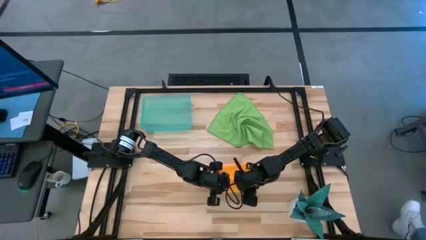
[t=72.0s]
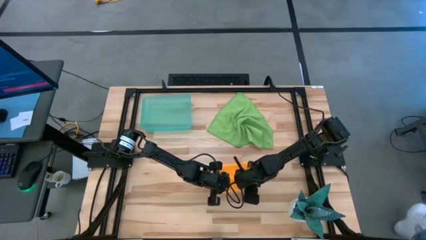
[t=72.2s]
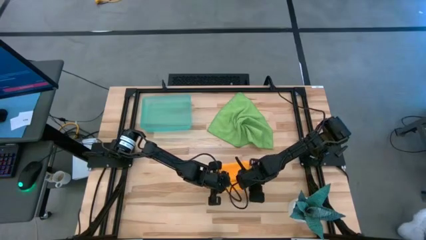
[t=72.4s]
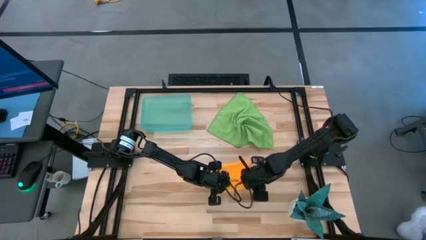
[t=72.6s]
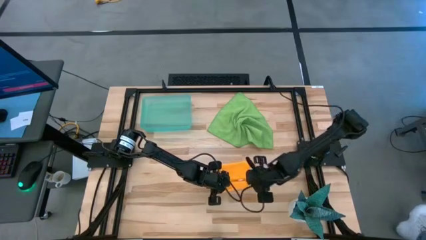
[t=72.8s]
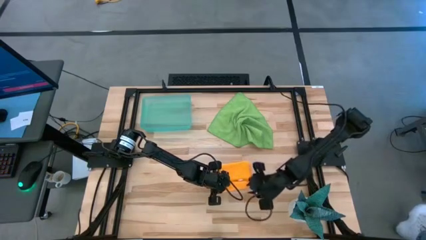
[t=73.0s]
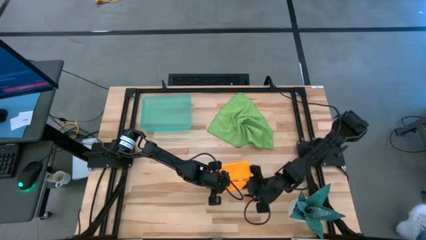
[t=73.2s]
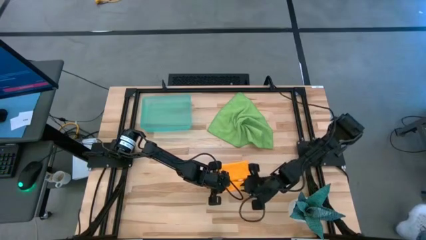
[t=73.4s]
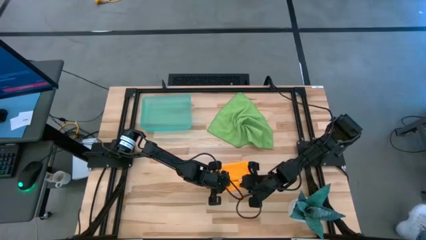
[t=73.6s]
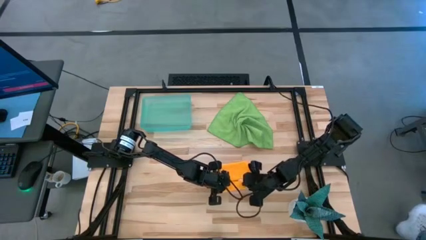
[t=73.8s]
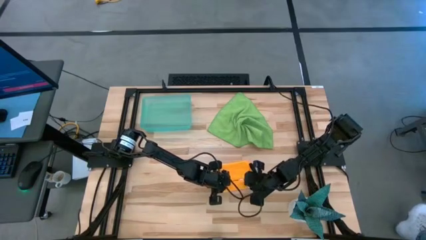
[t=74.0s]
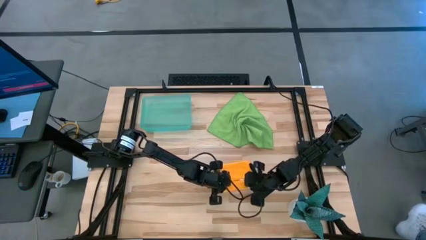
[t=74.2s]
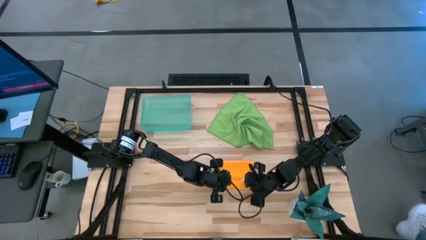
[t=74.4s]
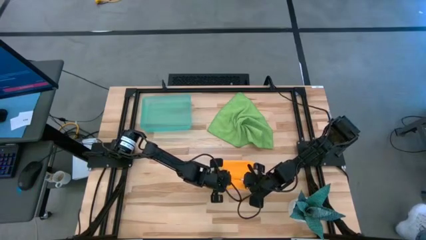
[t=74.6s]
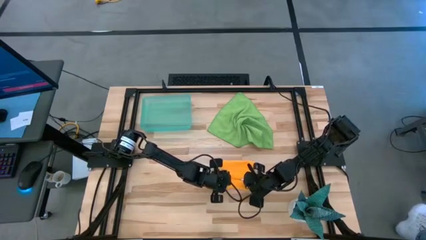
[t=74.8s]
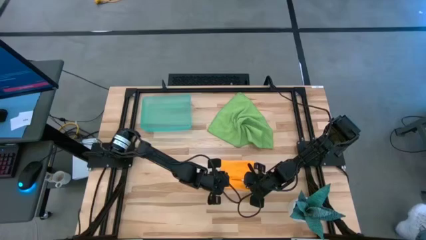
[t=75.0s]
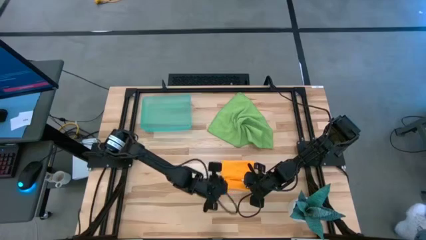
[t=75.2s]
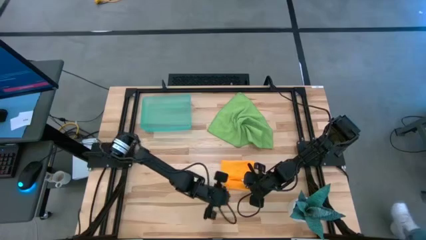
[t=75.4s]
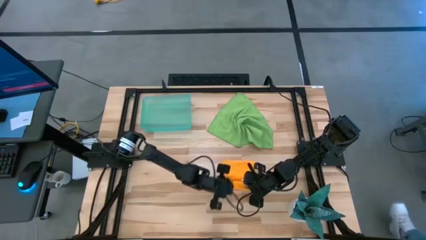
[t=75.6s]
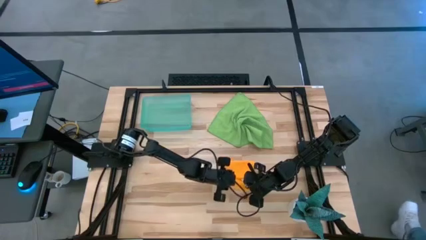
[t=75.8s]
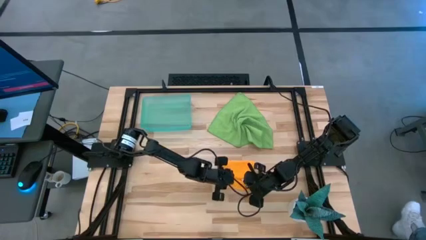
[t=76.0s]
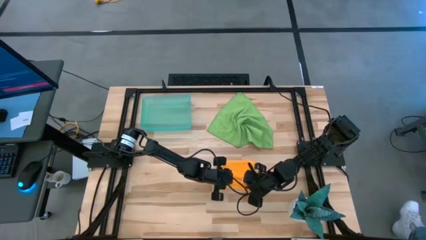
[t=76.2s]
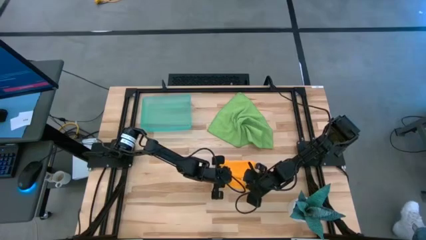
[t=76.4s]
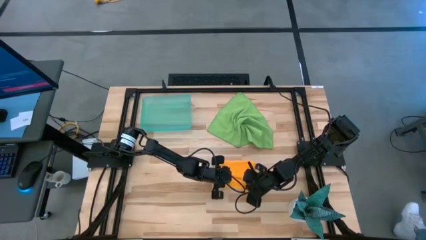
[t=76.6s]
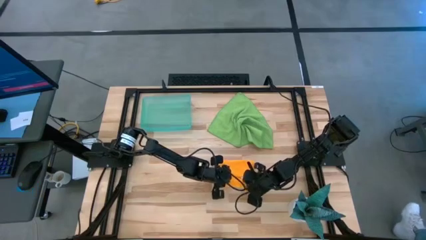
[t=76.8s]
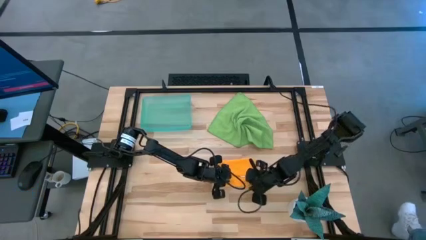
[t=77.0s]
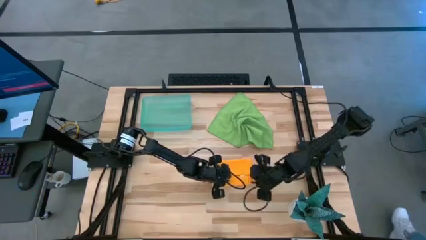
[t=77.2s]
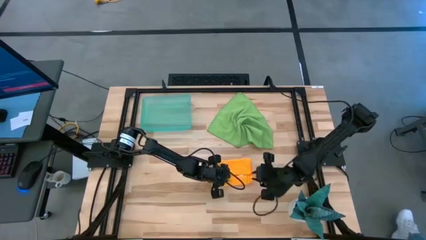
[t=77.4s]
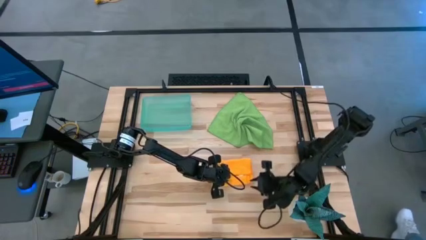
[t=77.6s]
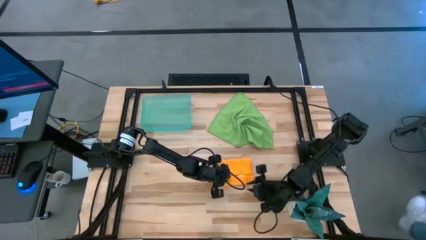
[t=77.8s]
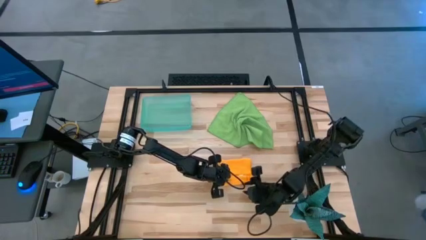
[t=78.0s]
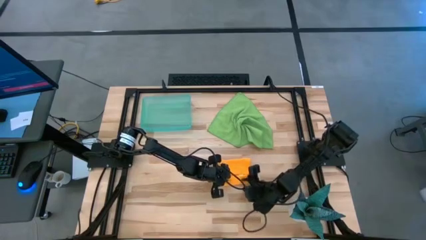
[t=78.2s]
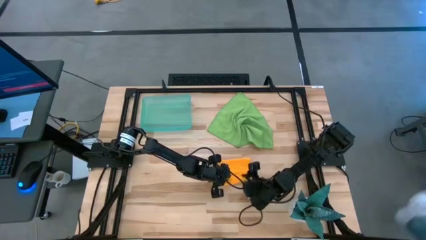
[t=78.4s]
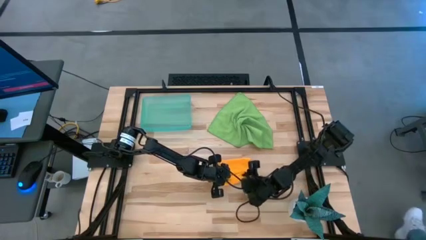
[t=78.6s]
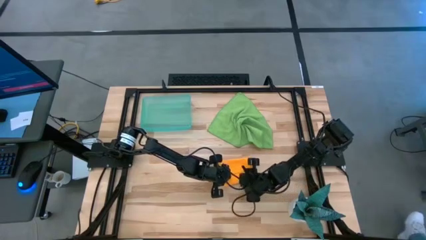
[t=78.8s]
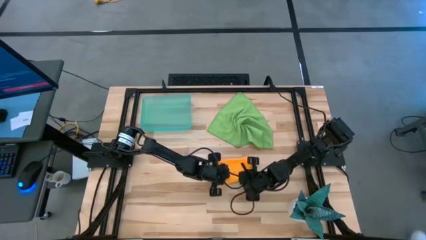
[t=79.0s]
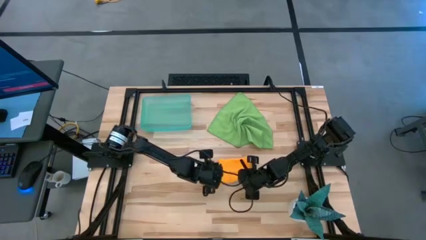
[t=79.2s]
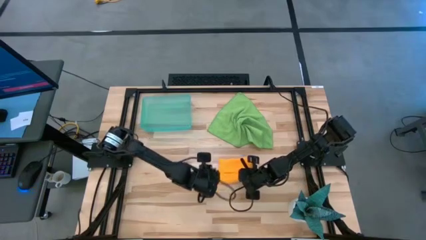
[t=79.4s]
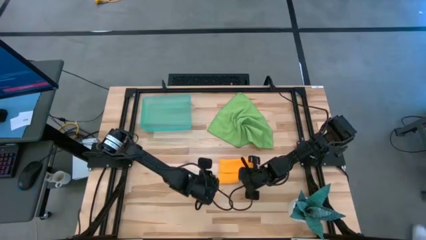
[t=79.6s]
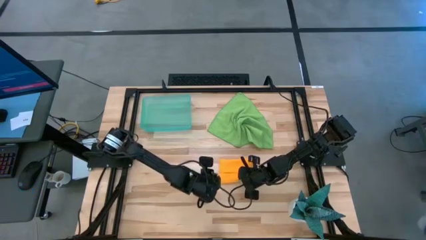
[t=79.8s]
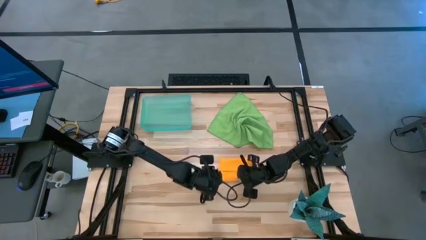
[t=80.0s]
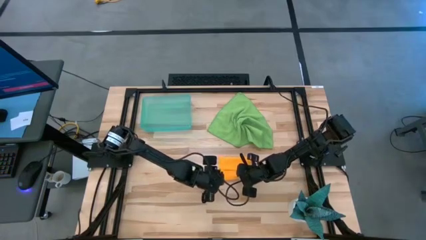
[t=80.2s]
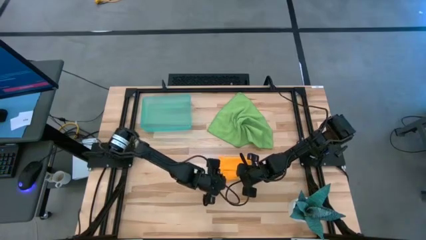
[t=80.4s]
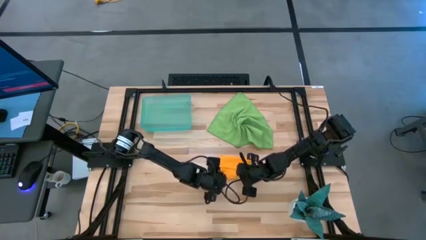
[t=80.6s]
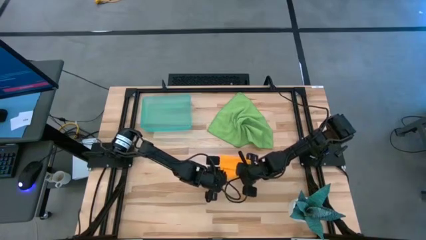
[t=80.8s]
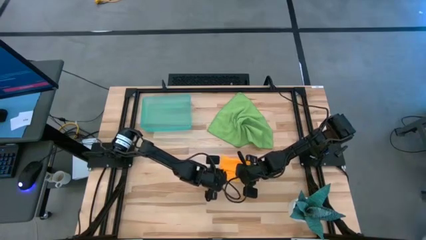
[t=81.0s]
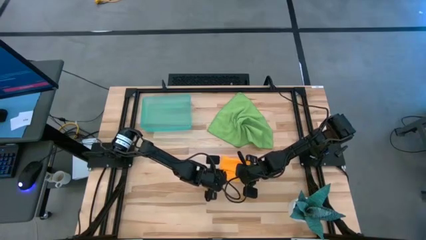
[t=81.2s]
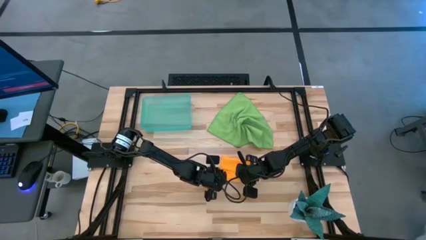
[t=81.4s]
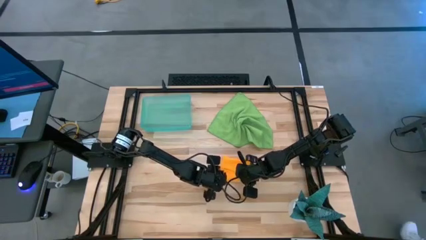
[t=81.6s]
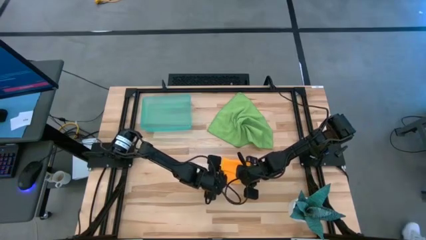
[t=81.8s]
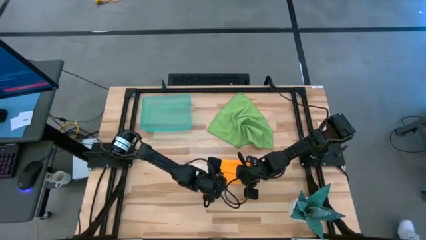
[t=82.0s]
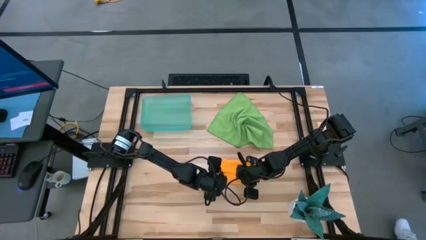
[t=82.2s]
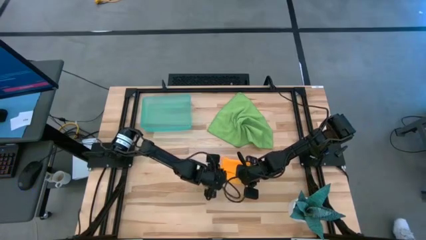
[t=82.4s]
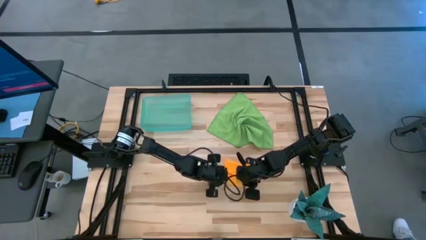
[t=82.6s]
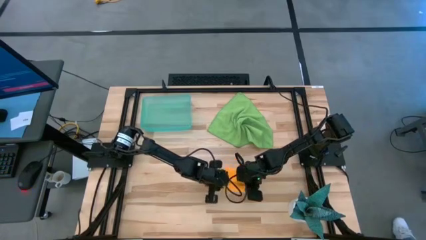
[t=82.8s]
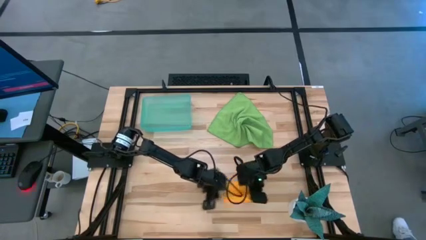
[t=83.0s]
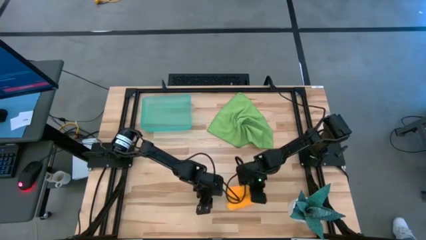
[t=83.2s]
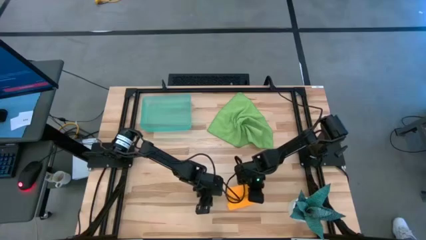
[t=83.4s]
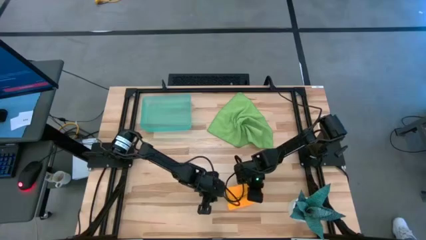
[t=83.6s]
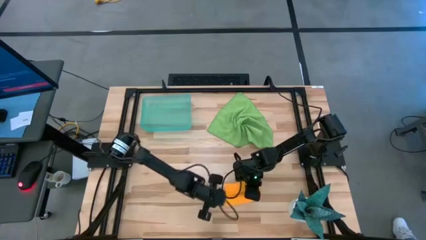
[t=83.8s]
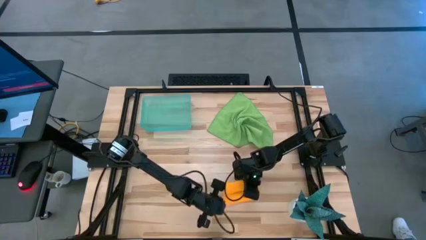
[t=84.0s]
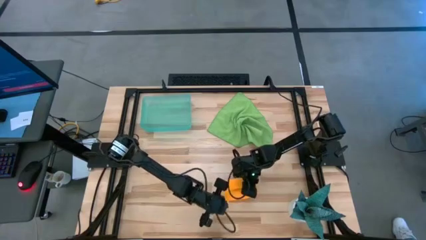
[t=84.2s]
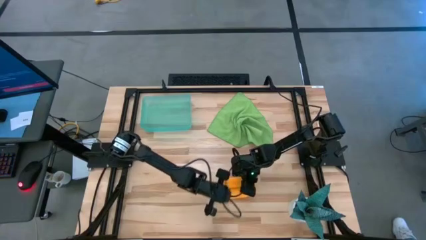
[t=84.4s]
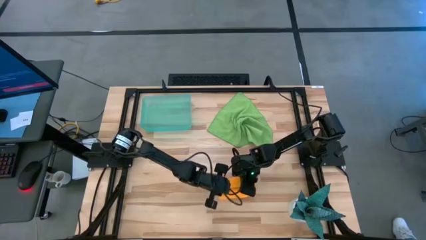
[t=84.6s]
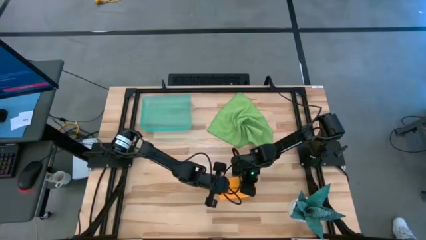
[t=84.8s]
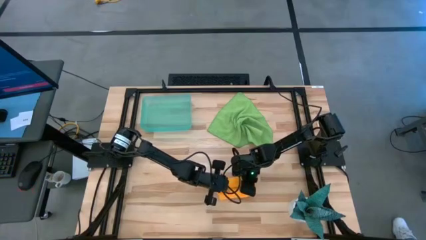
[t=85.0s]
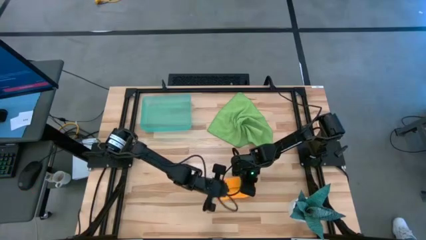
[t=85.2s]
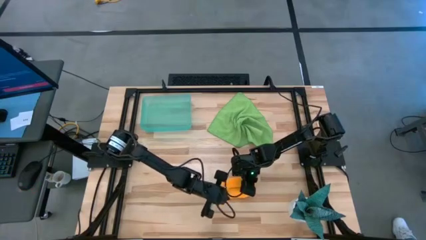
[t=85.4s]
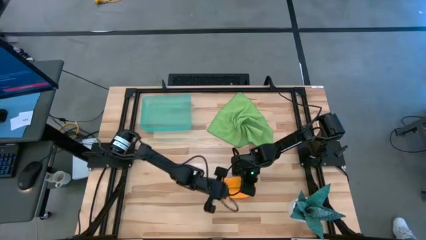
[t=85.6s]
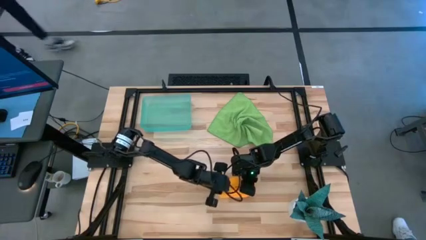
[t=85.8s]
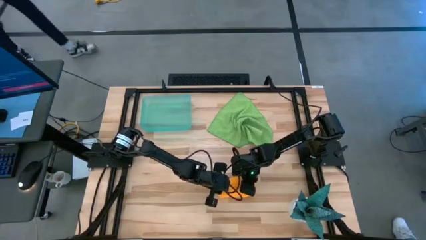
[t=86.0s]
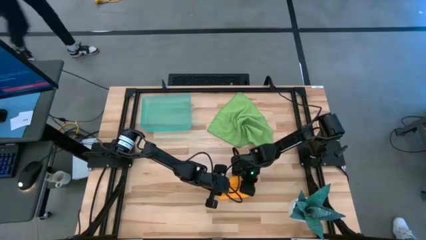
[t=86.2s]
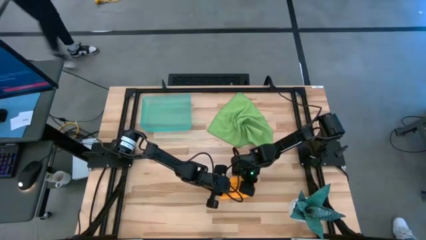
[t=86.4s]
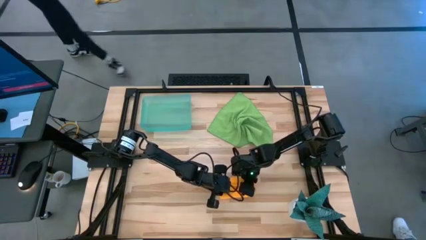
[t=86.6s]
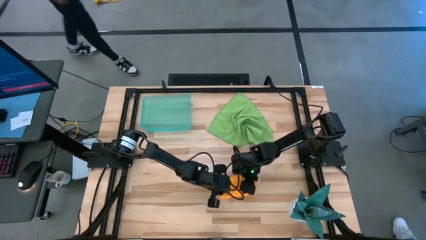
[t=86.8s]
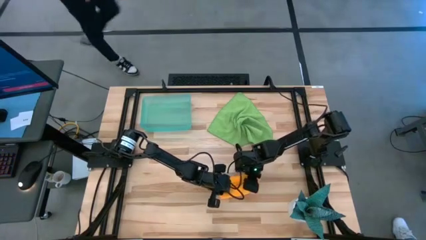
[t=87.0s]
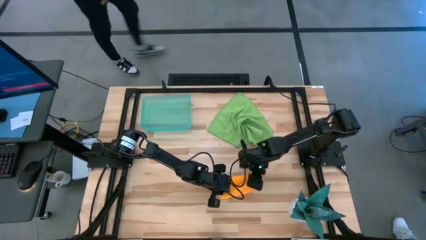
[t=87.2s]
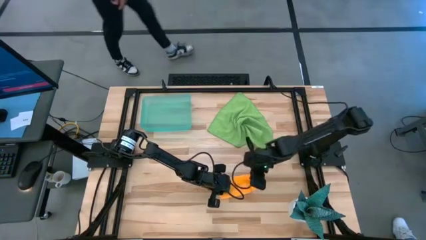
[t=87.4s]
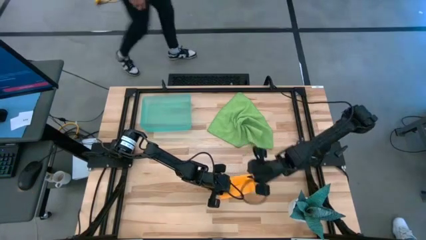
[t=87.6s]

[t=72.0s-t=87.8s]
Task: Roll microfiber towels into tight, uniform cylinder then place into a basket
Roll the yellow towel
